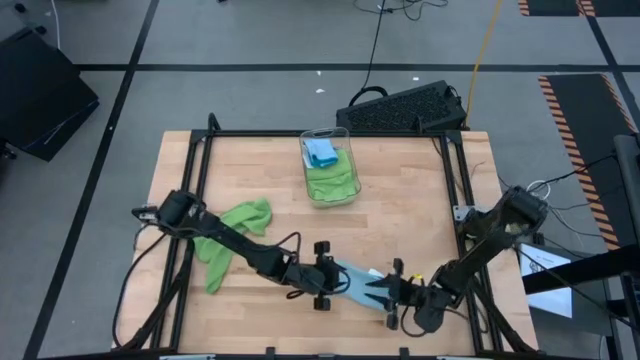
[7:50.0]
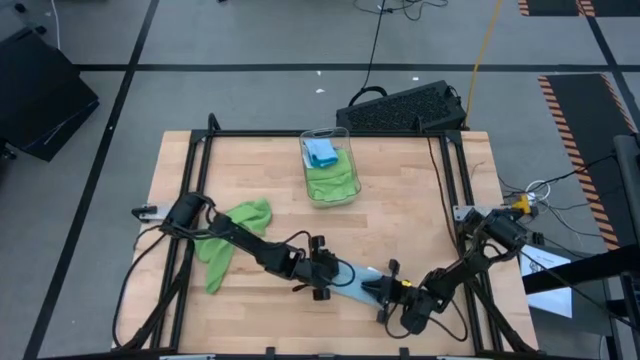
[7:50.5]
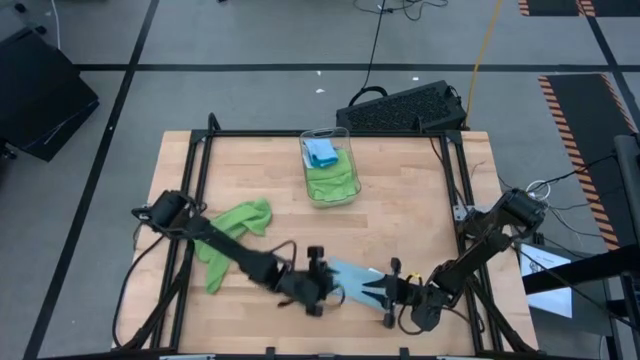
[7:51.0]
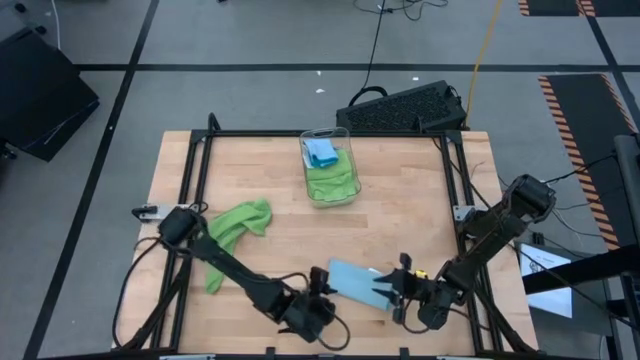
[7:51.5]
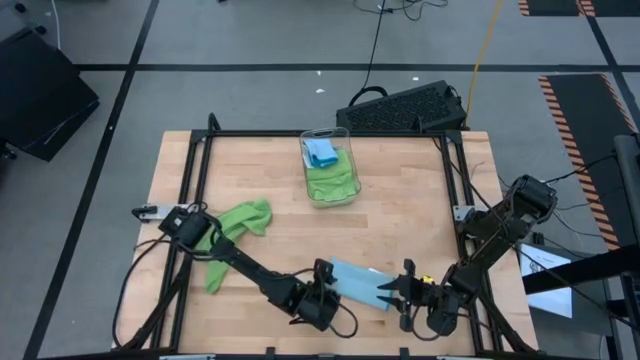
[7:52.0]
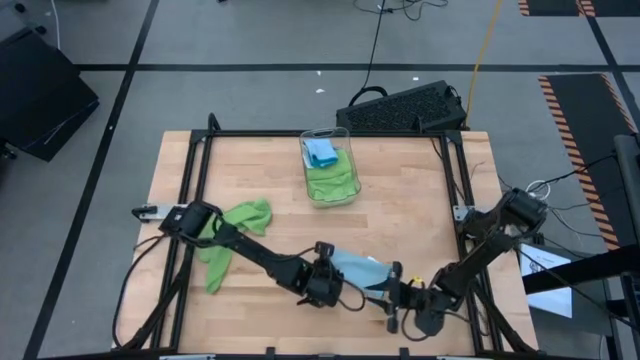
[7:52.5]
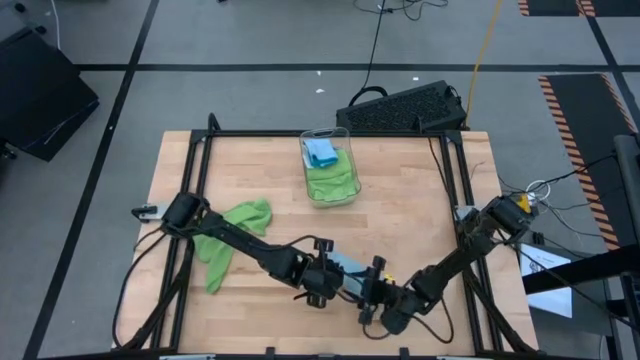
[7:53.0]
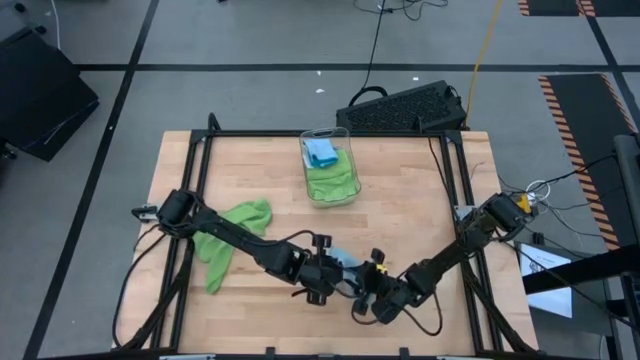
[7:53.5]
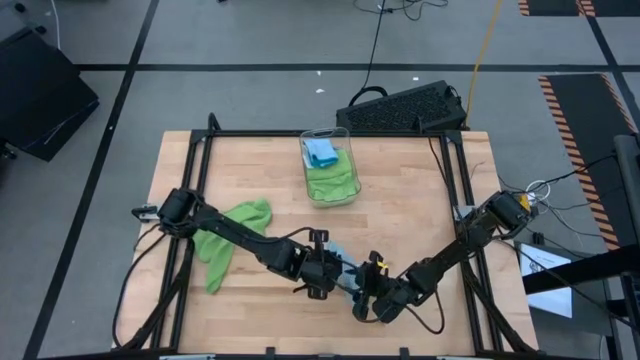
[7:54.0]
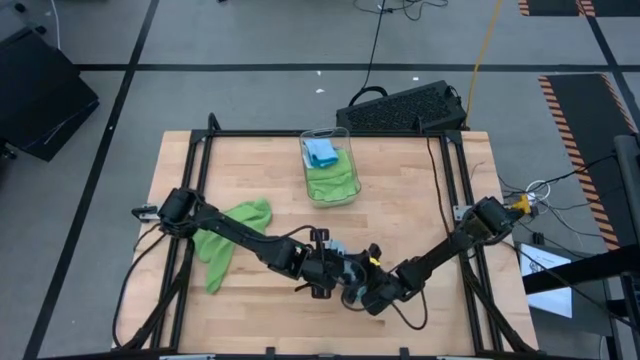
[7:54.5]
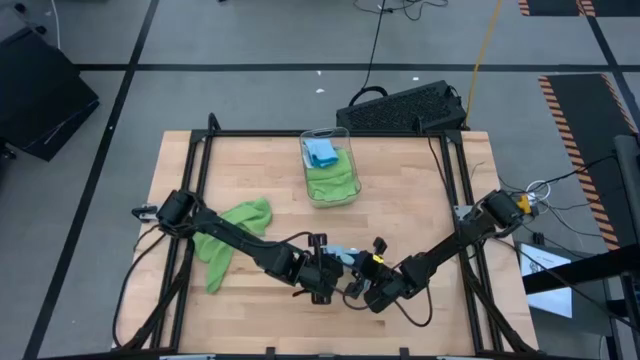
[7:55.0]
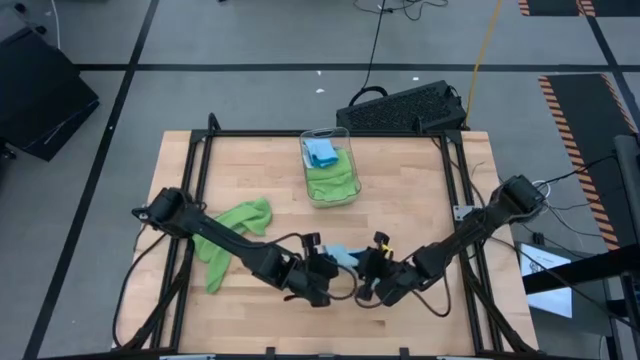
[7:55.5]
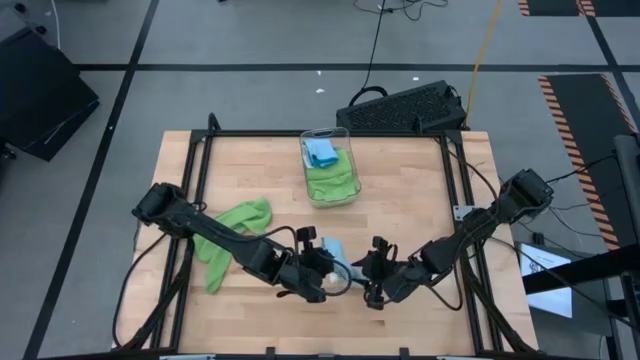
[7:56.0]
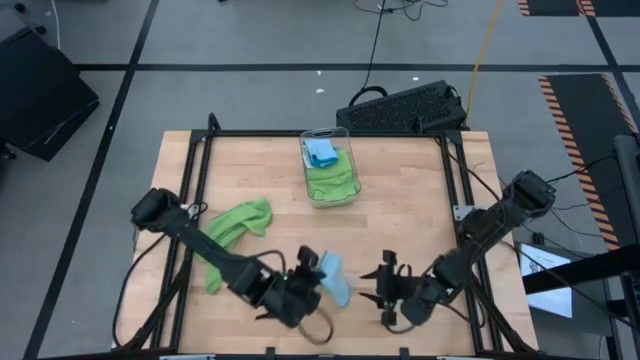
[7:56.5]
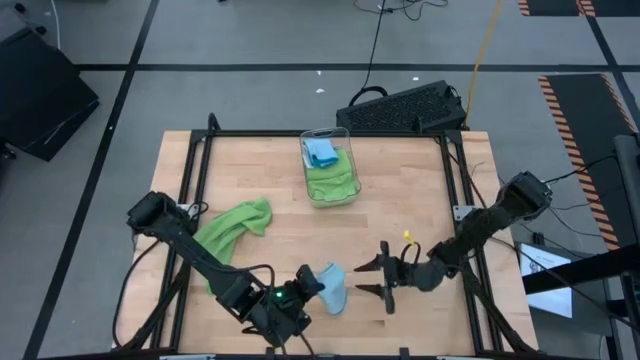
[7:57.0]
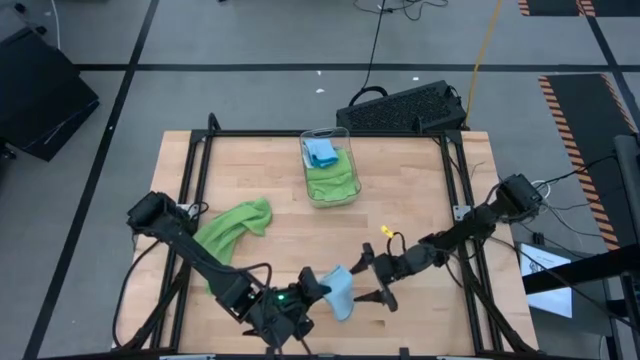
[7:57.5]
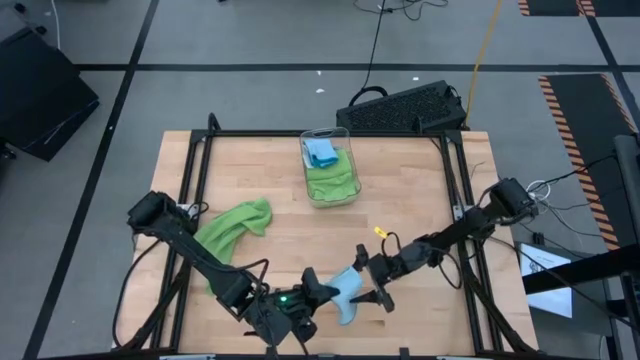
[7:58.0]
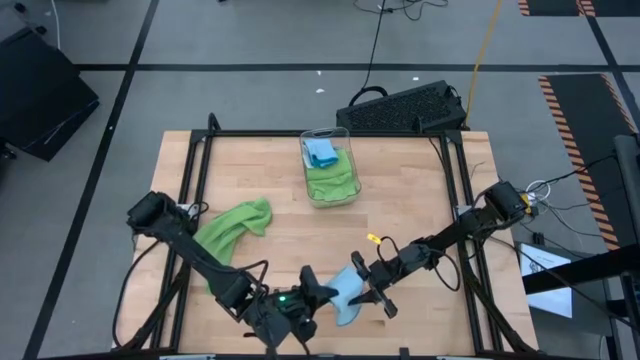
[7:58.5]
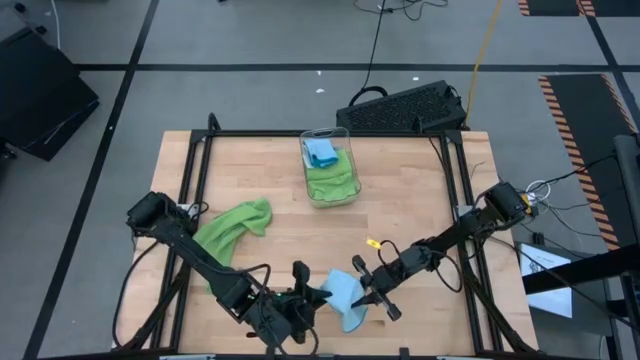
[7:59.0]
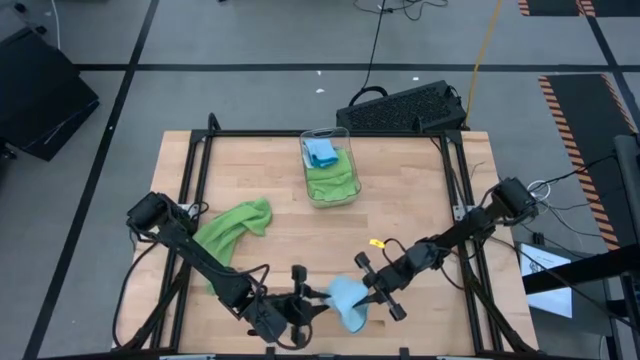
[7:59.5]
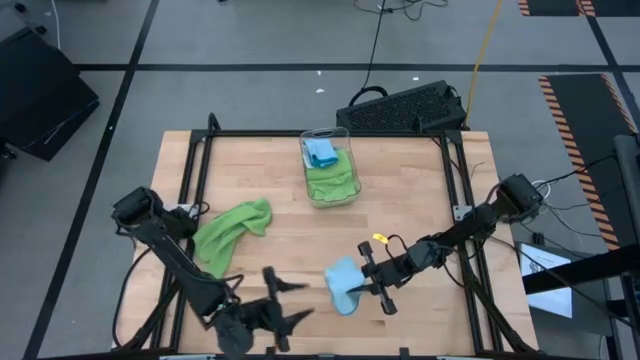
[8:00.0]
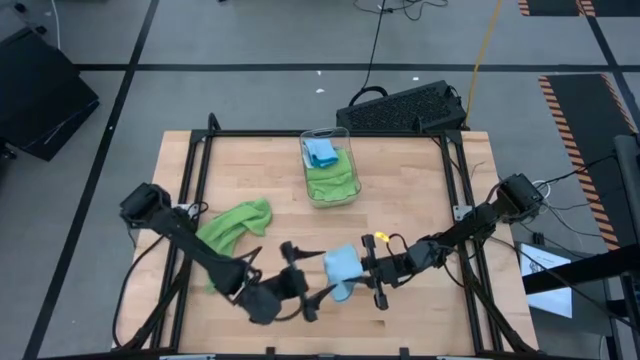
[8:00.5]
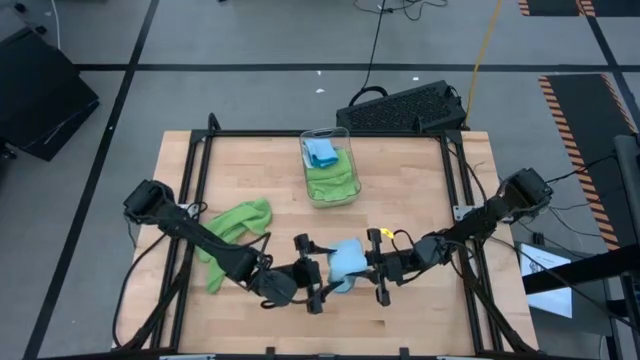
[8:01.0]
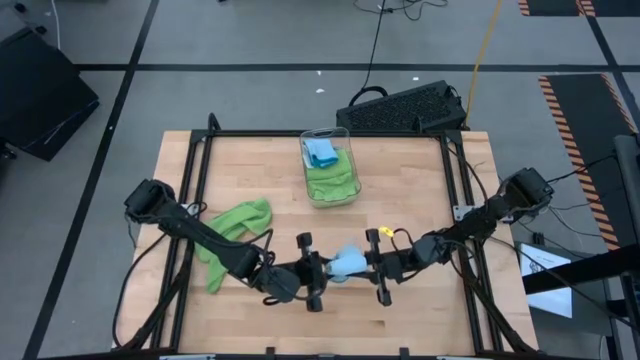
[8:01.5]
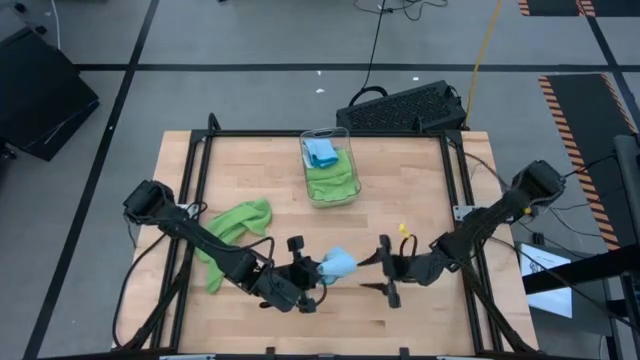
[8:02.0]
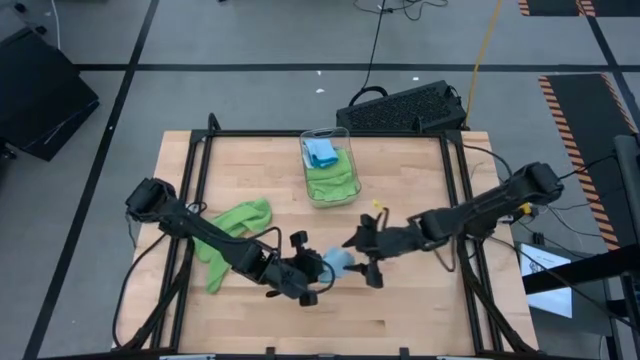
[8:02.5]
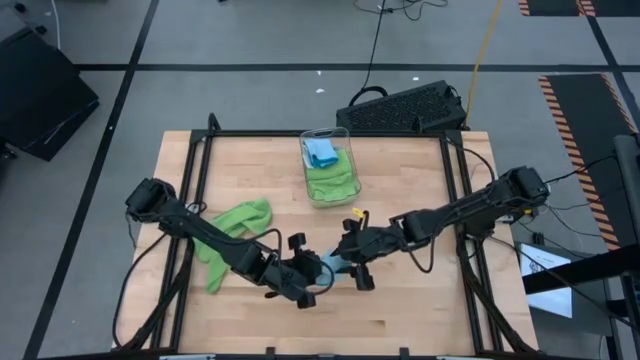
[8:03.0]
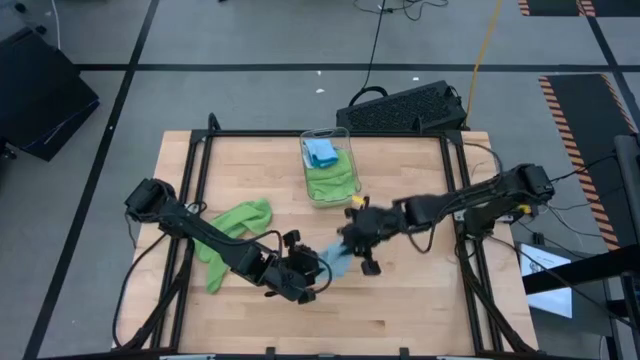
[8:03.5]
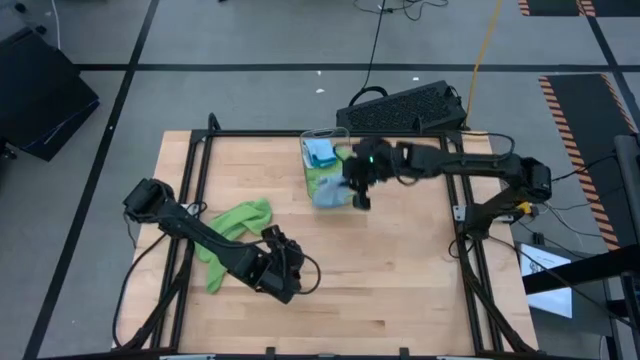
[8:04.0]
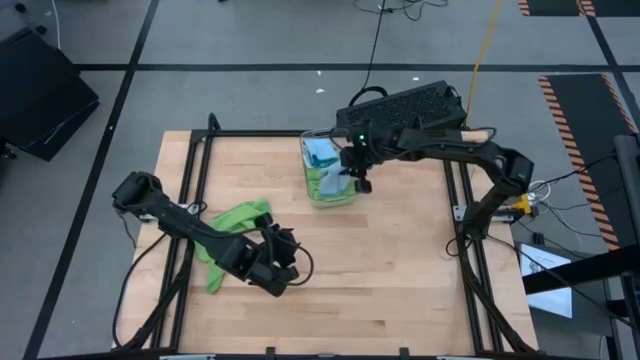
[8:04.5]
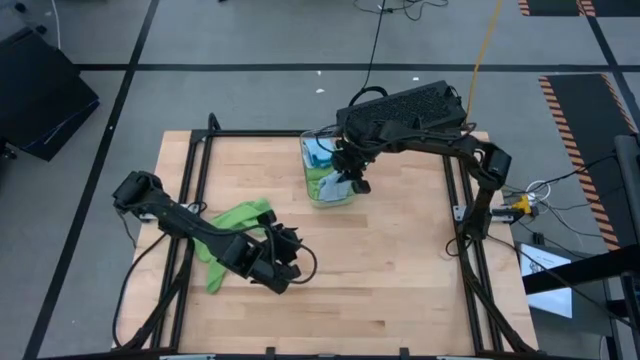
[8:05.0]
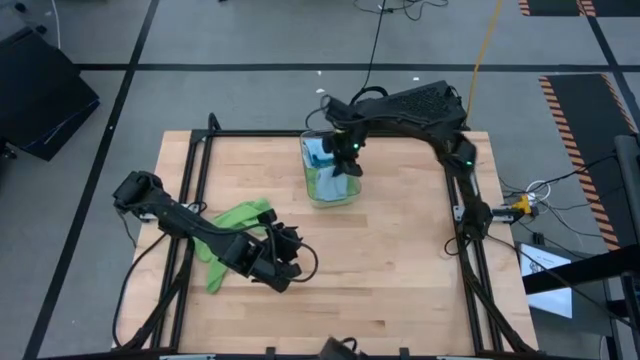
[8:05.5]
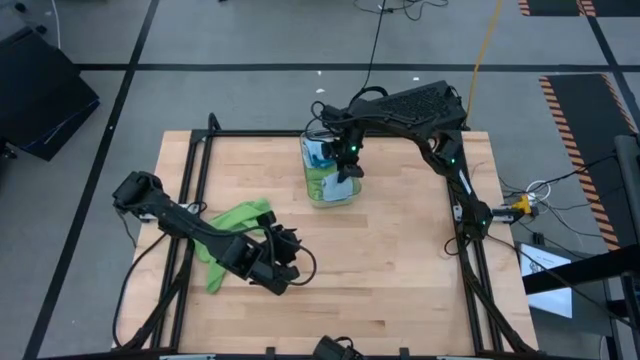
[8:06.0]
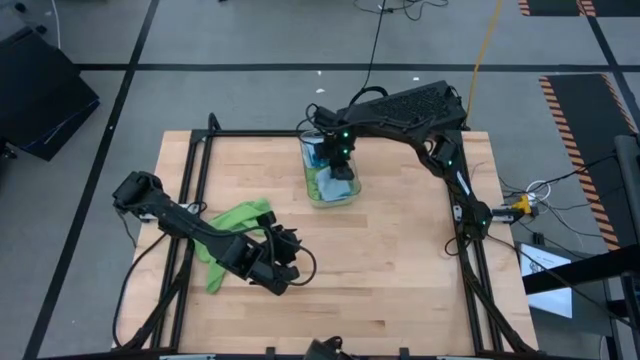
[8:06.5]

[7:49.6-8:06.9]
Task: Fold microfiber towels
Put the blue towel into the transparent bin
